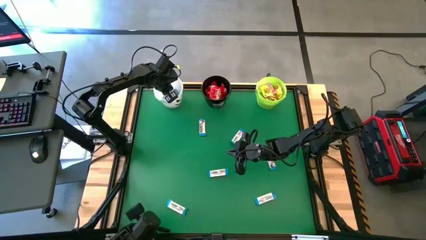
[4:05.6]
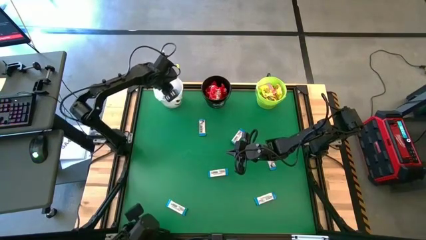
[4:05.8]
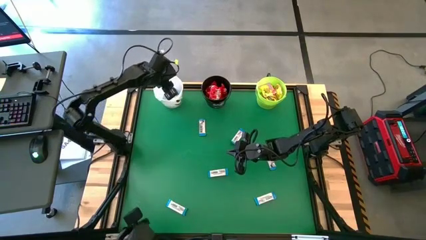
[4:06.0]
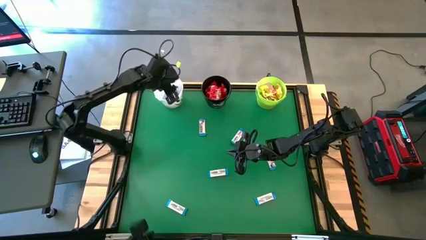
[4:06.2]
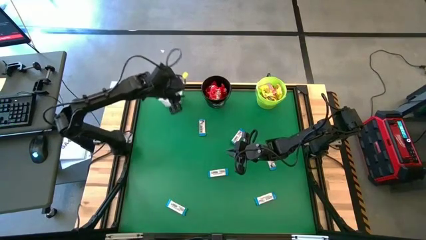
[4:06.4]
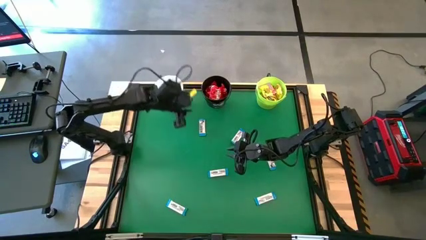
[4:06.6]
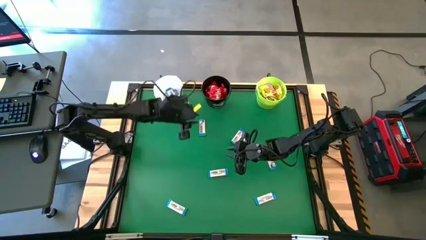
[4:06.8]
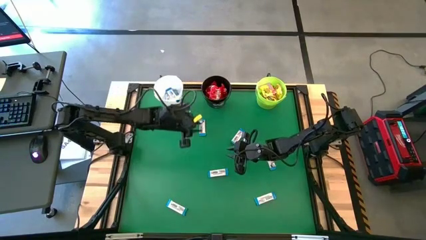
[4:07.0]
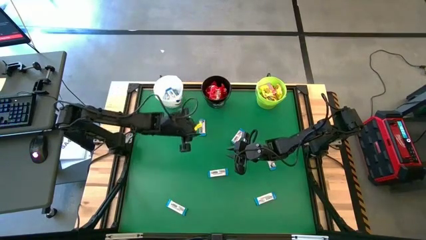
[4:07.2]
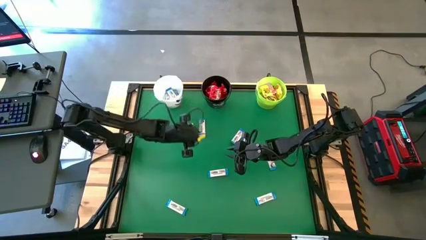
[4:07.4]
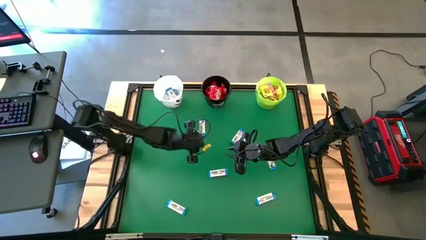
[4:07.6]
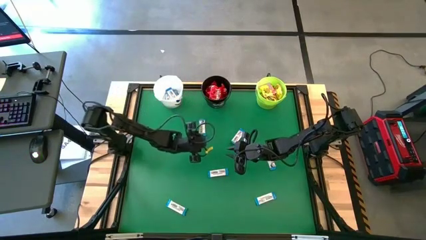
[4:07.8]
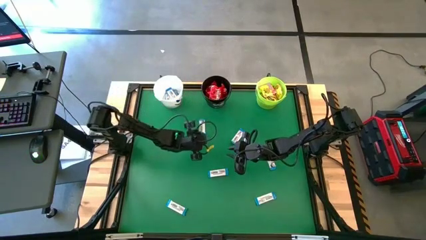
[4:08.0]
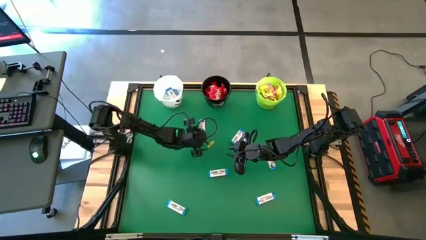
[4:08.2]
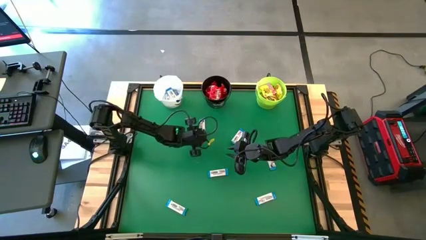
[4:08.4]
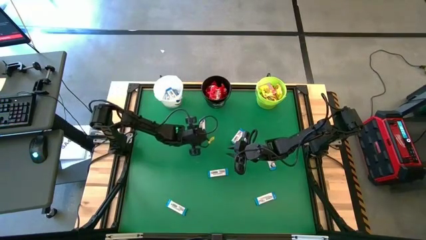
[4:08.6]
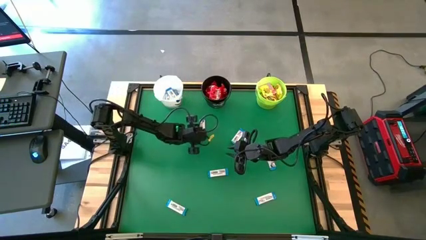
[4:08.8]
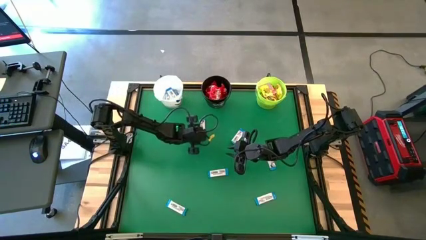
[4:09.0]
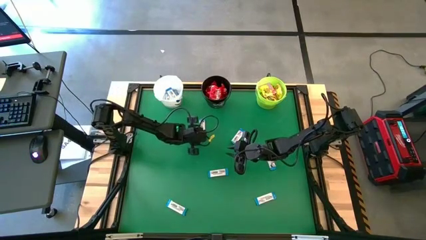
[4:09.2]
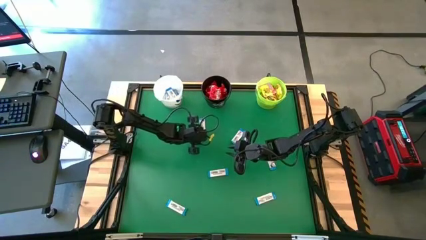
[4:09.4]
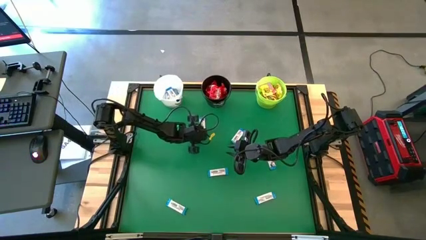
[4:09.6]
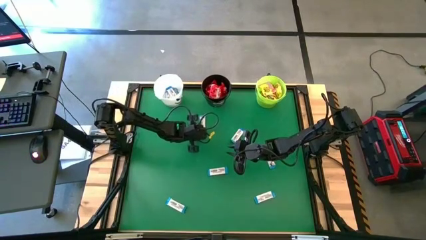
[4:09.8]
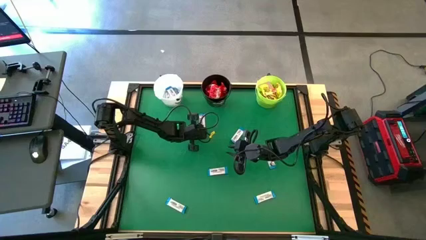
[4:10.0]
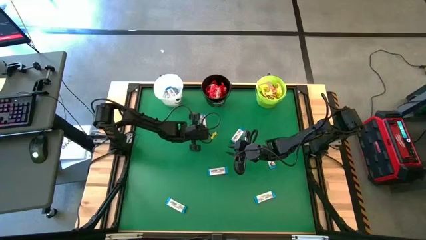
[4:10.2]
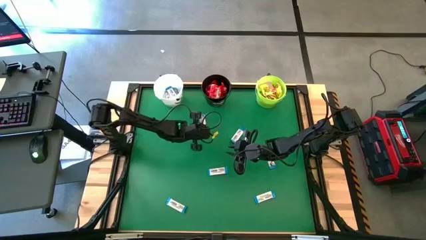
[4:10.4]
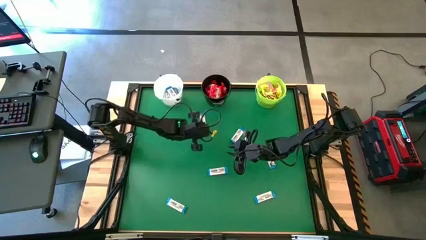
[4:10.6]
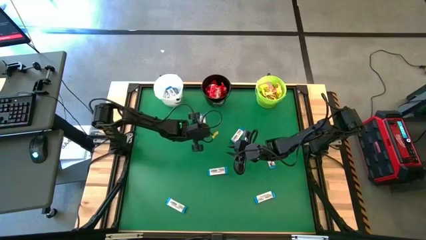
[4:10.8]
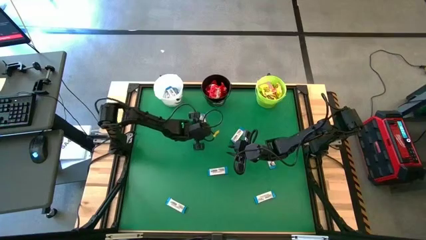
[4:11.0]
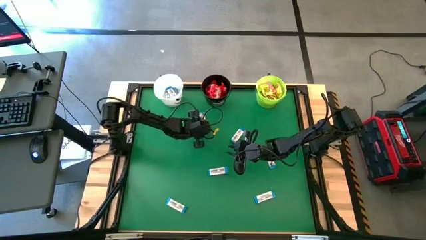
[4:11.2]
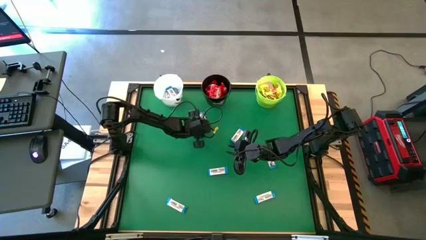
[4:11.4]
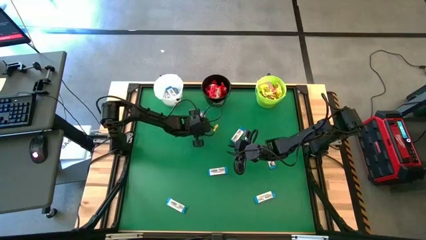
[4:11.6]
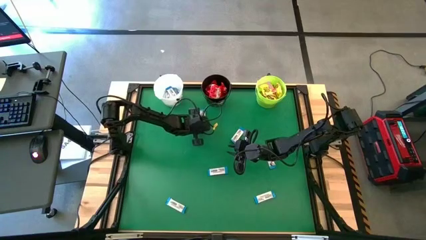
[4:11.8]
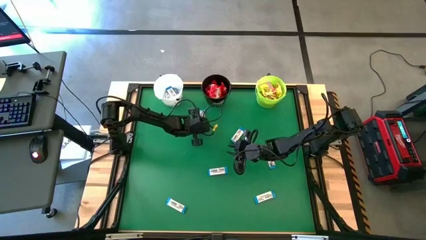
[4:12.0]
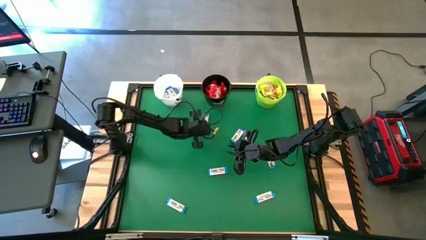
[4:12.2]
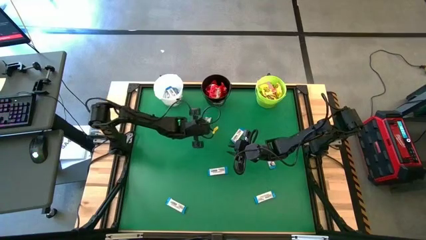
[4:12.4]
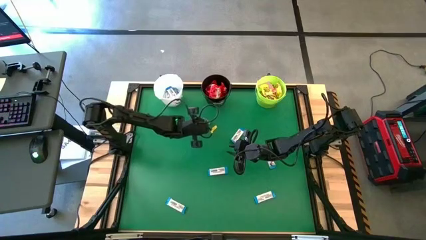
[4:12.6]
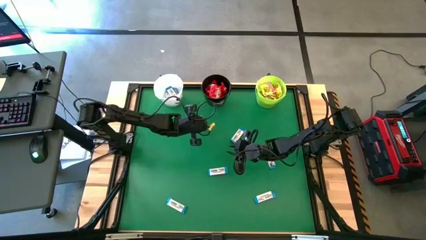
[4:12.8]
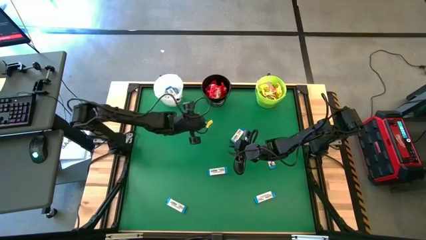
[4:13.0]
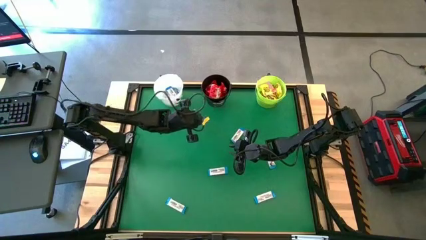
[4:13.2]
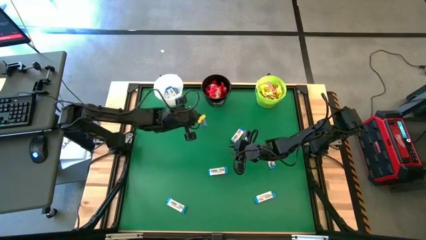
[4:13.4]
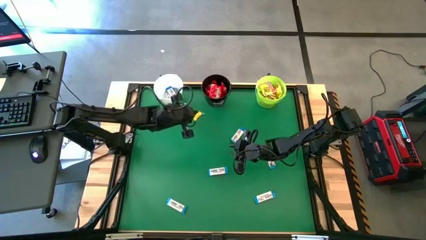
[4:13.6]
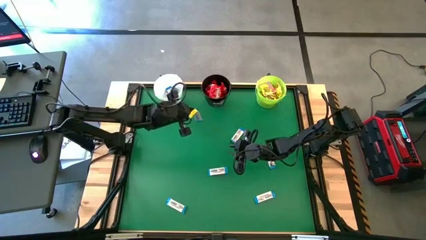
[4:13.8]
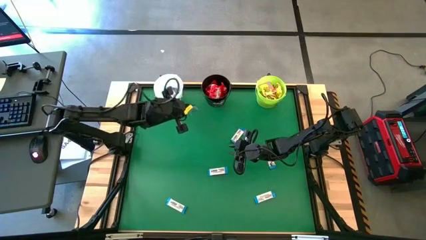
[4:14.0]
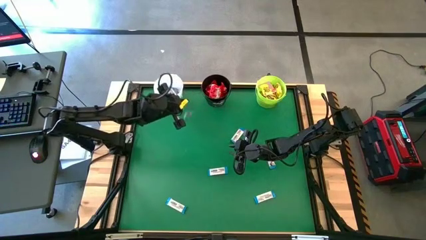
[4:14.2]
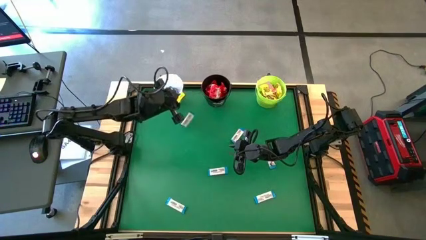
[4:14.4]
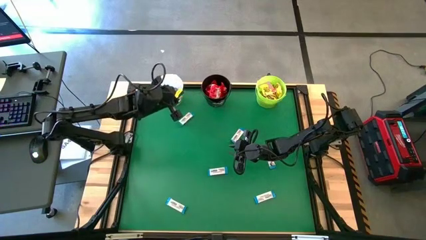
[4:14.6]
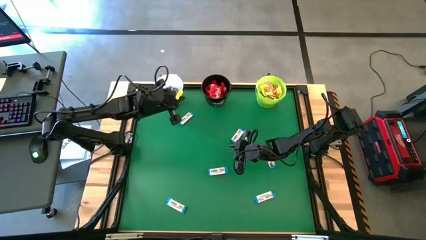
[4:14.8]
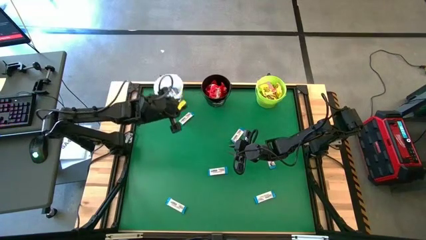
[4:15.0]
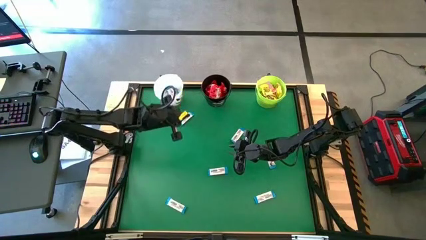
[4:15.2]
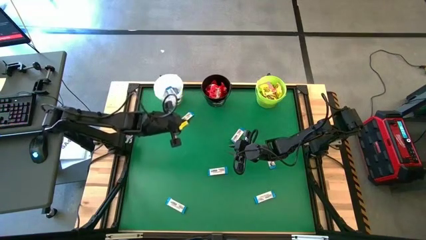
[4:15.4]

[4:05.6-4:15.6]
Task: Sort candy by brand, put in halloween buckets
Put the white chocolate bar into the white bucket

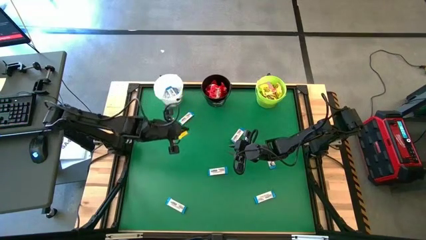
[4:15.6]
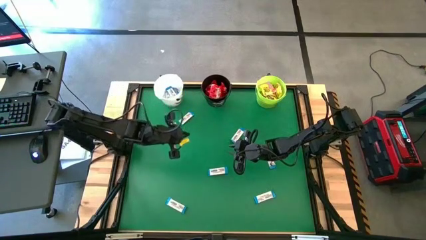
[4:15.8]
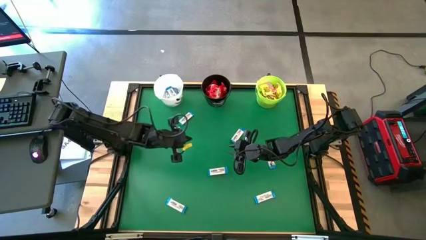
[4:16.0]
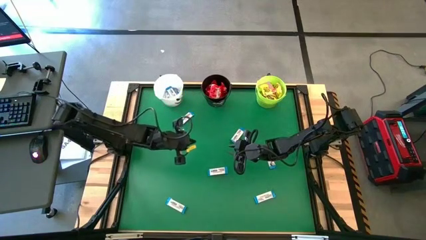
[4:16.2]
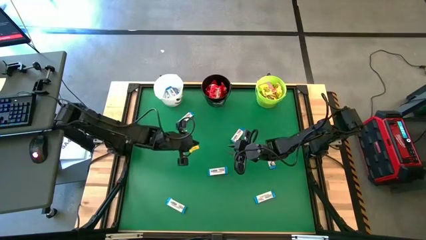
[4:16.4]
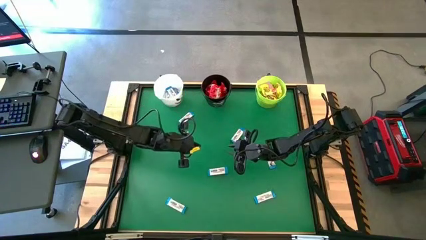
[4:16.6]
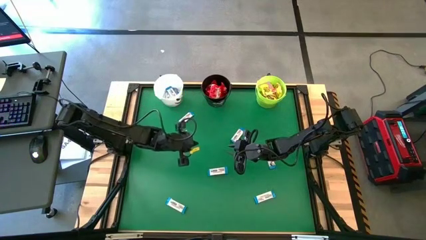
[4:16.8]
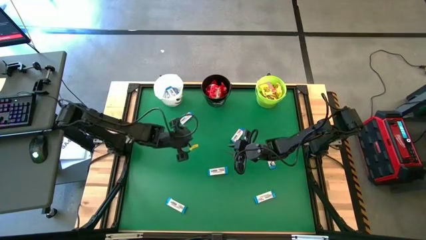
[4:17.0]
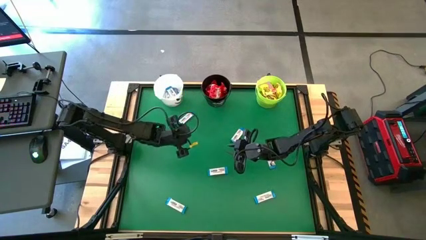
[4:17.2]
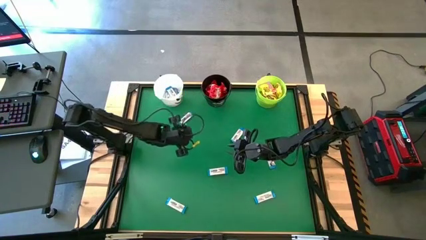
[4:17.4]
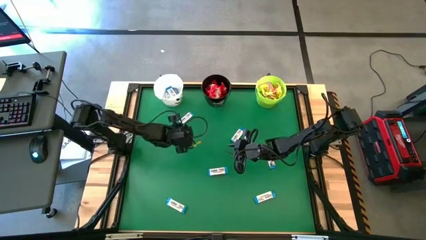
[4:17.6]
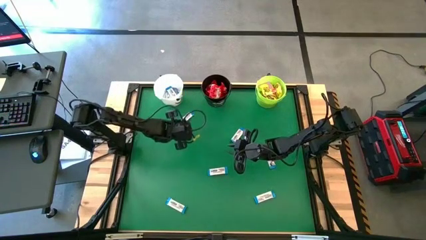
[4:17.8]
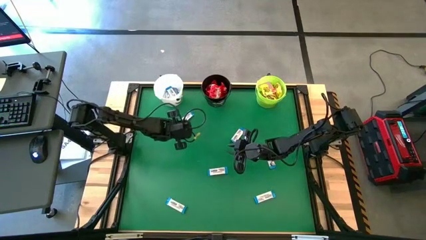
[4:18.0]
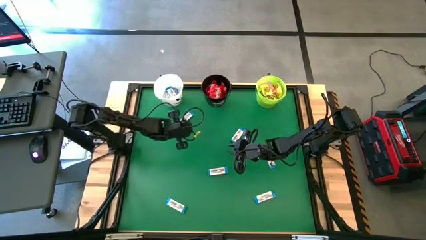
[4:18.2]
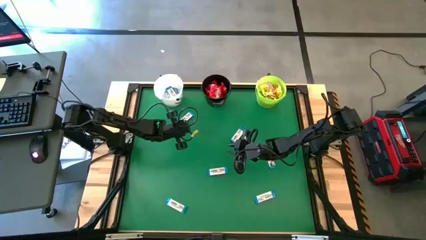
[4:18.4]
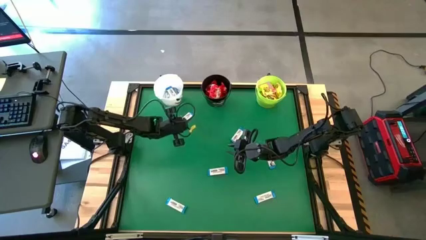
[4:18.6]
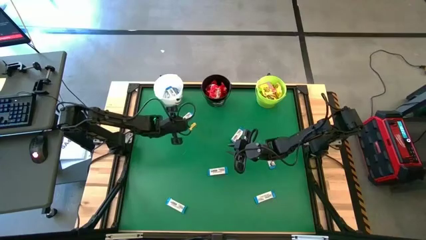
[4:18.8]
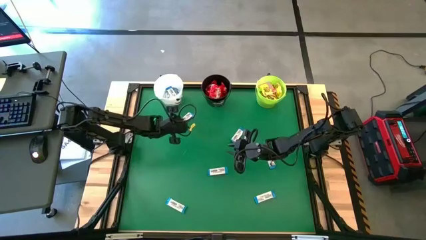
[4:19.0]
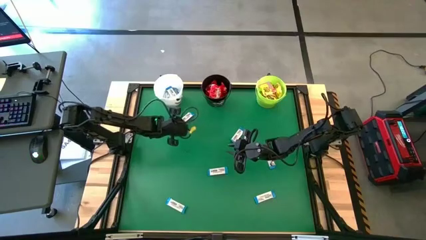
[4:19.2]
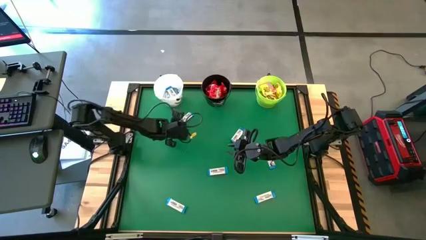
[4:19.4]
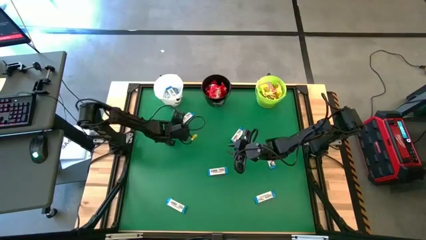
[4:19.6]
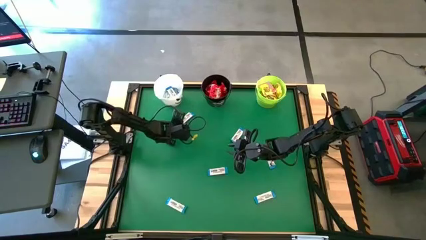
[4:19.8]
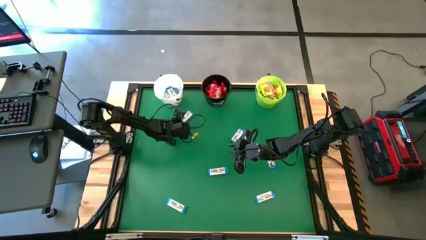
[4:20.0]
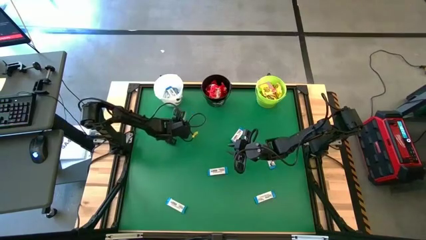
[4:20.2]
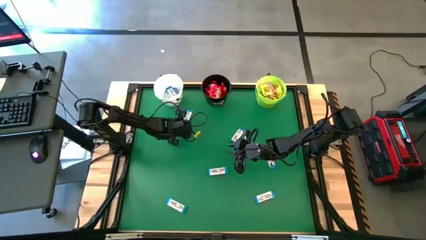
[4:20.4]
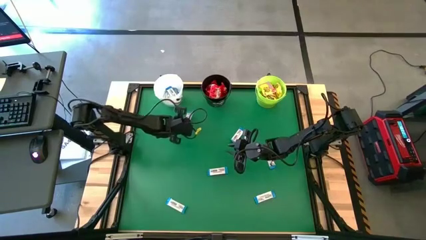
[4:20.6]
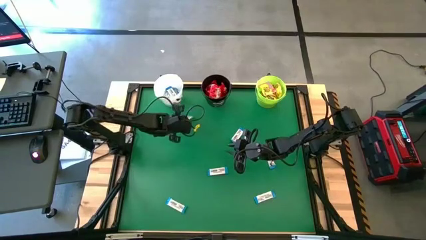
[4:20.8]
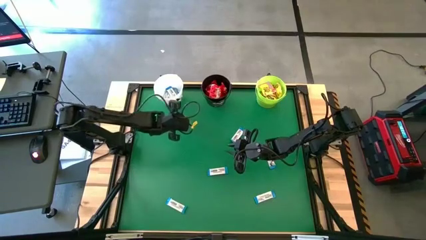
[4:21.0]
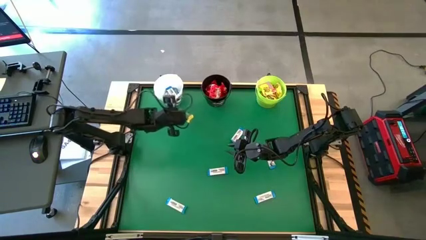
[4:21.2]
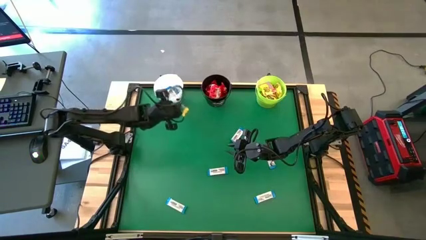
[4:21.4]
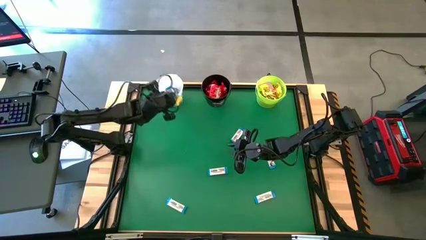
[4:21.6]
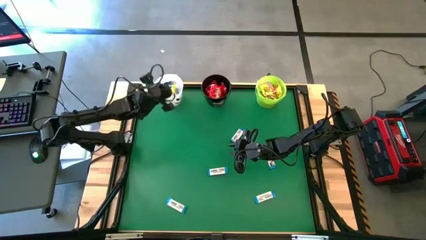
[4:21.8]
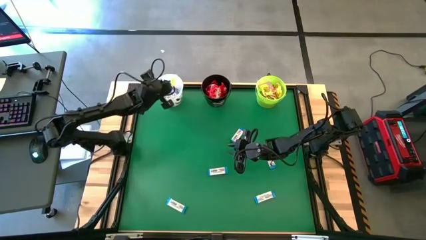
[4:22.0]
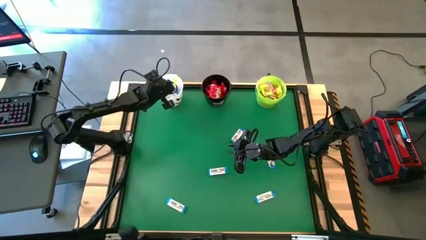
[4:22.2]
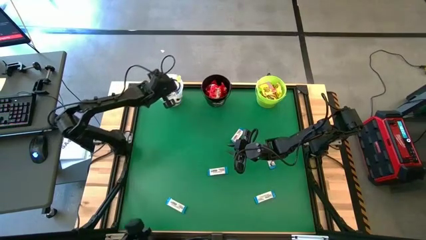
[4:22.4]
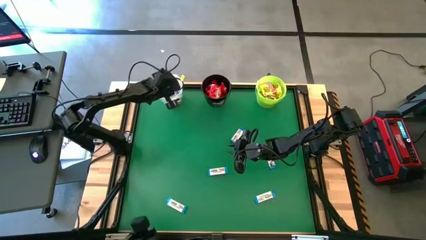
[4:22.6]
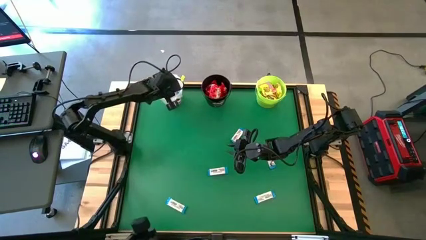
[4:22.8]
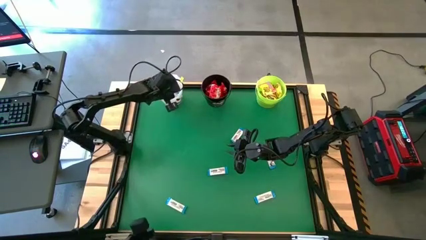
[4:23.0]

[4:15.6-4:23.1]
Put the white chocolate bar into the white bucket
